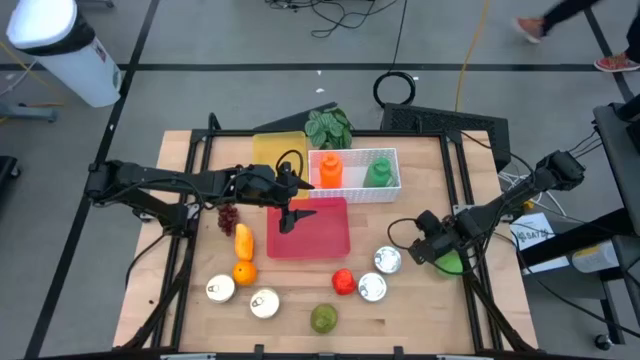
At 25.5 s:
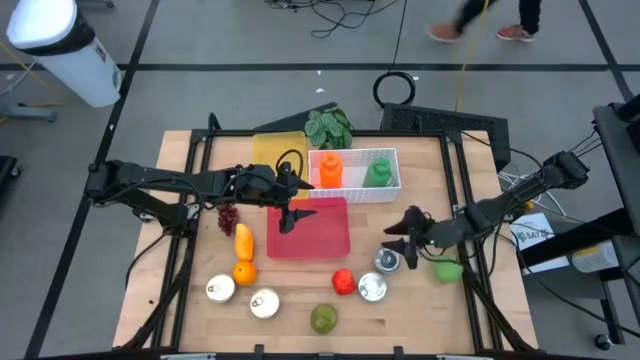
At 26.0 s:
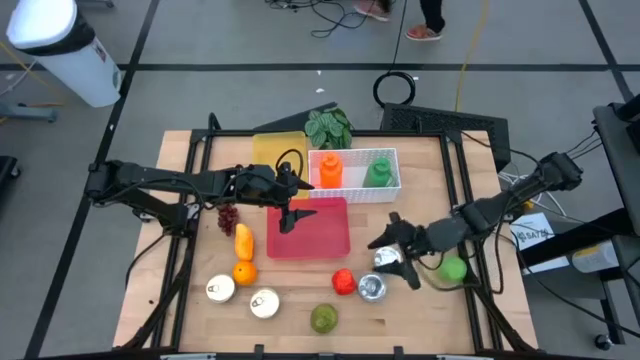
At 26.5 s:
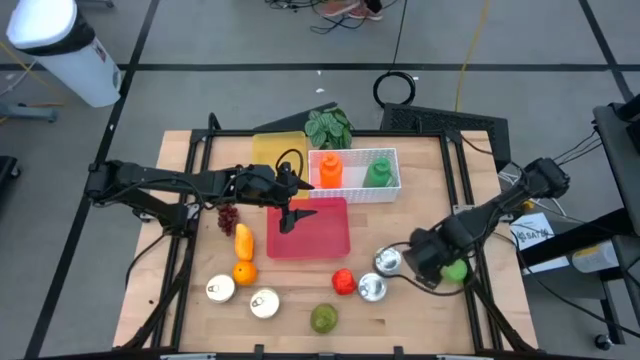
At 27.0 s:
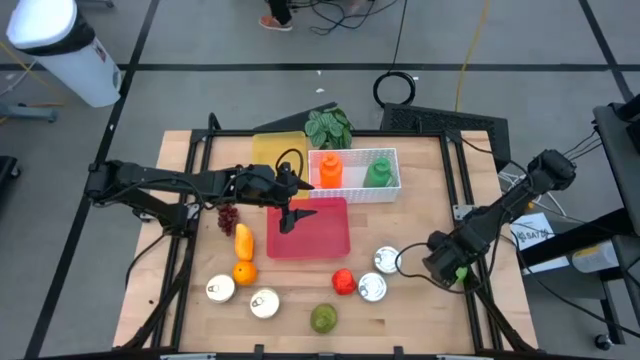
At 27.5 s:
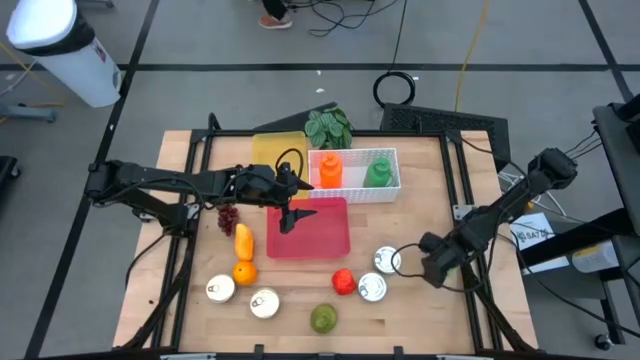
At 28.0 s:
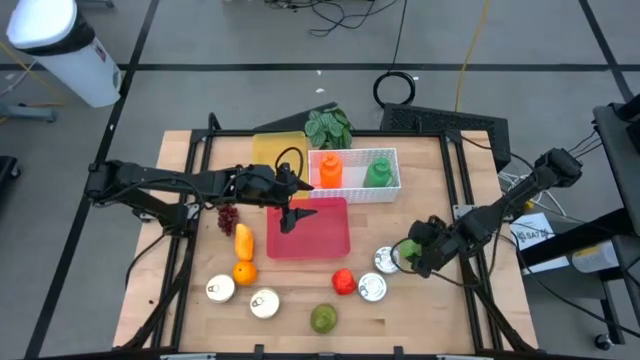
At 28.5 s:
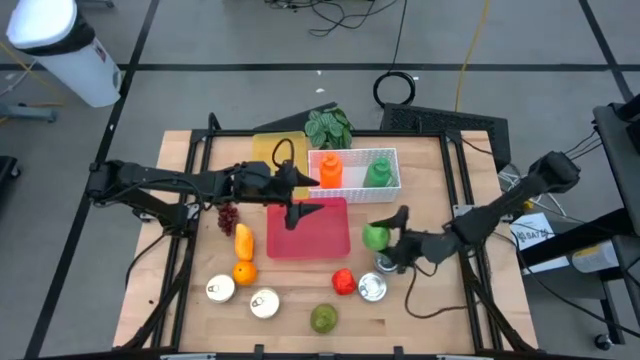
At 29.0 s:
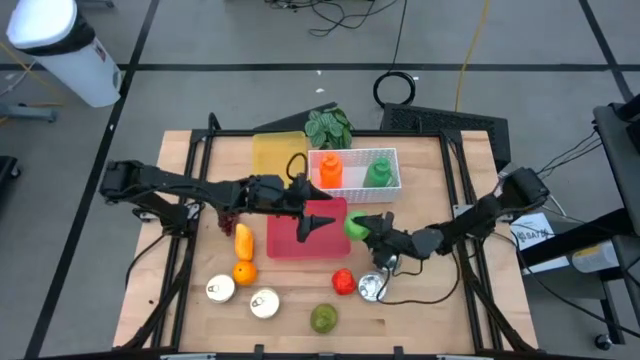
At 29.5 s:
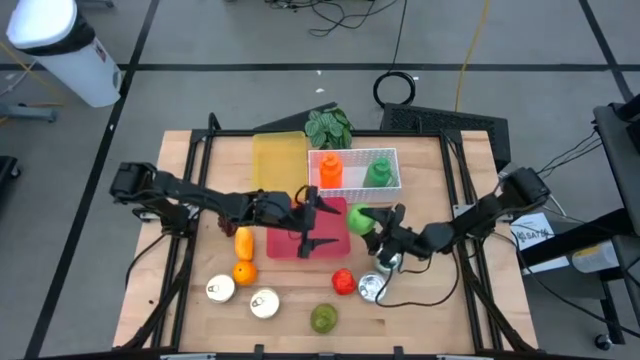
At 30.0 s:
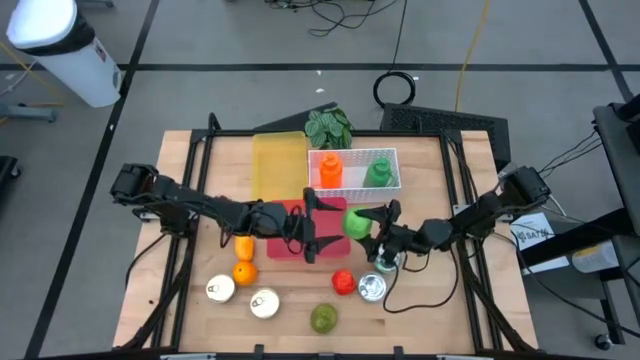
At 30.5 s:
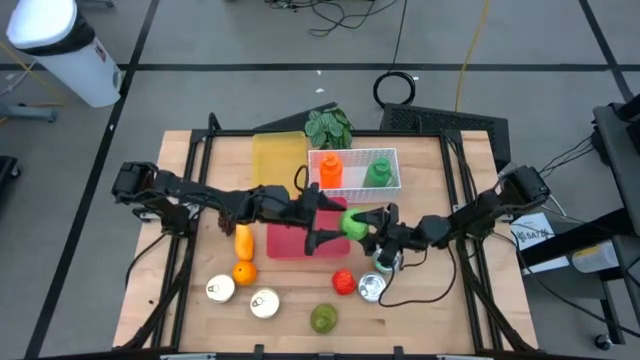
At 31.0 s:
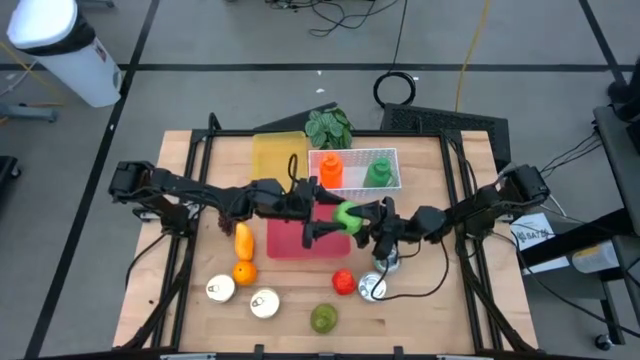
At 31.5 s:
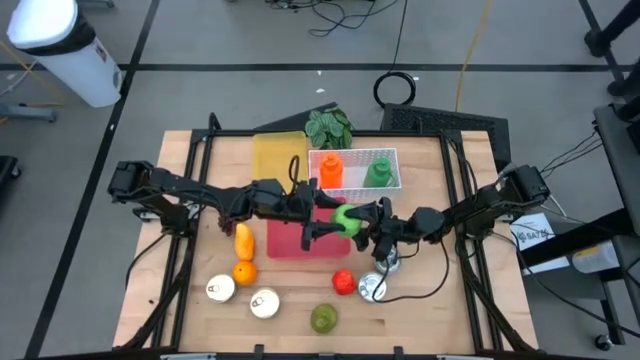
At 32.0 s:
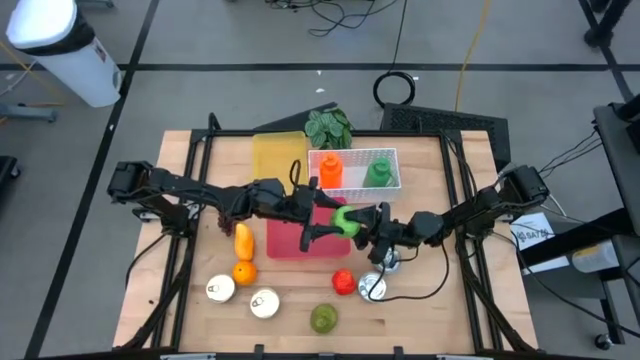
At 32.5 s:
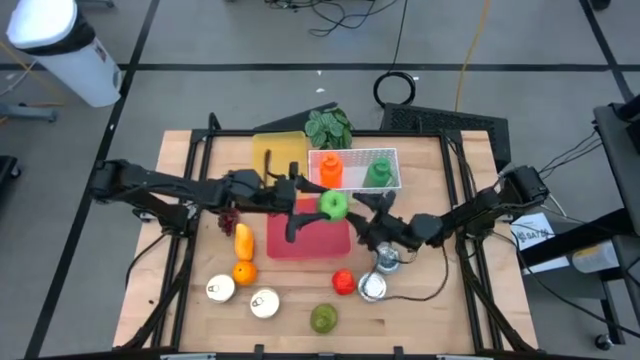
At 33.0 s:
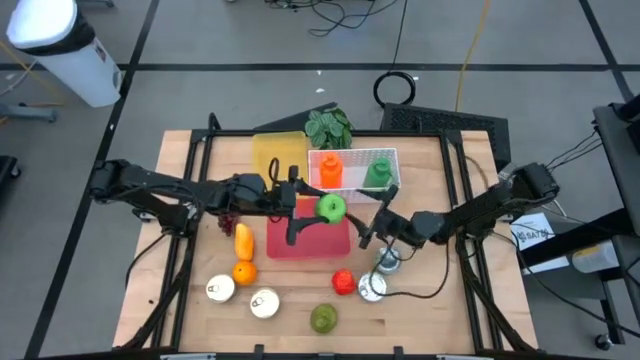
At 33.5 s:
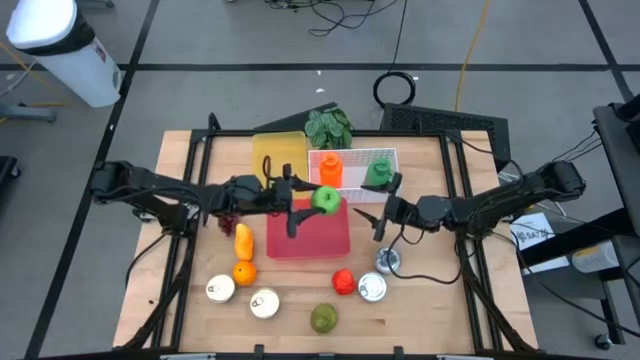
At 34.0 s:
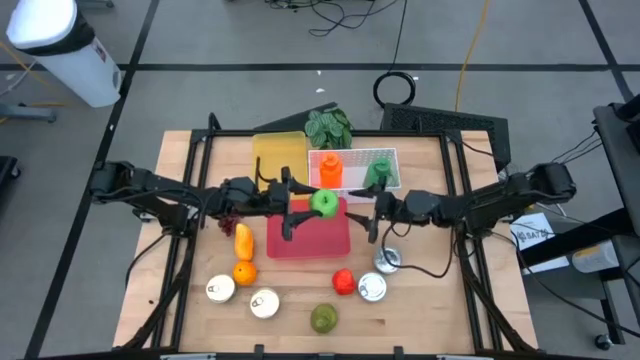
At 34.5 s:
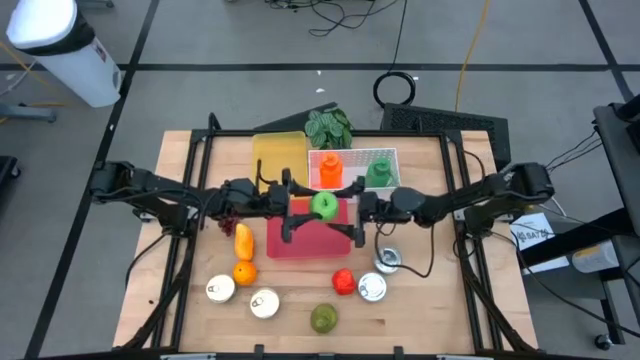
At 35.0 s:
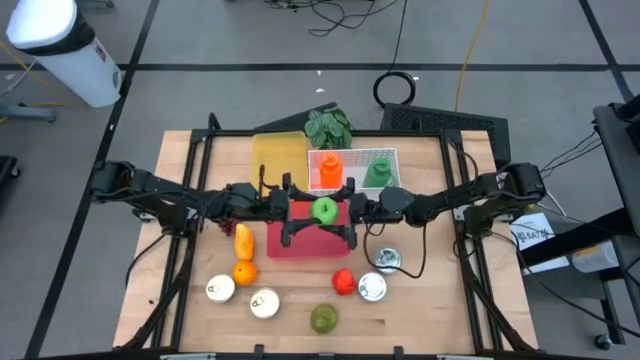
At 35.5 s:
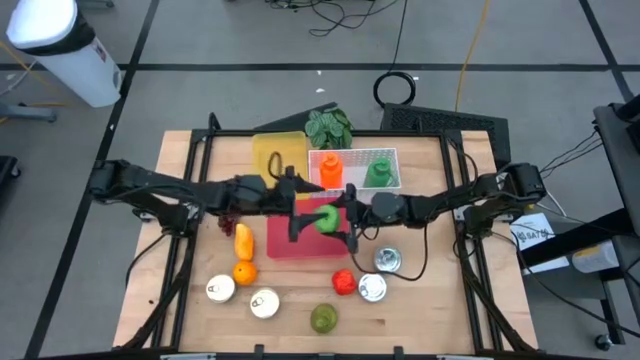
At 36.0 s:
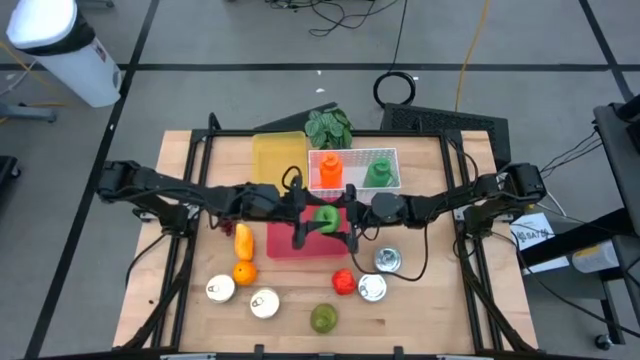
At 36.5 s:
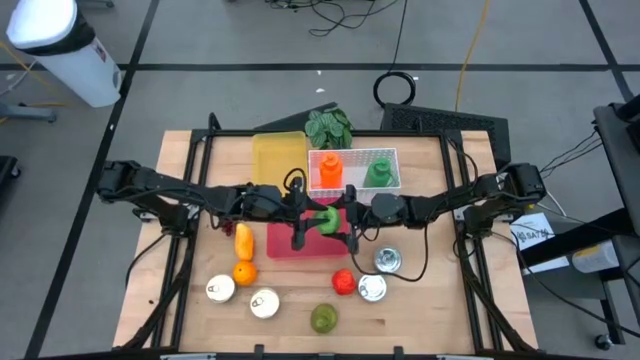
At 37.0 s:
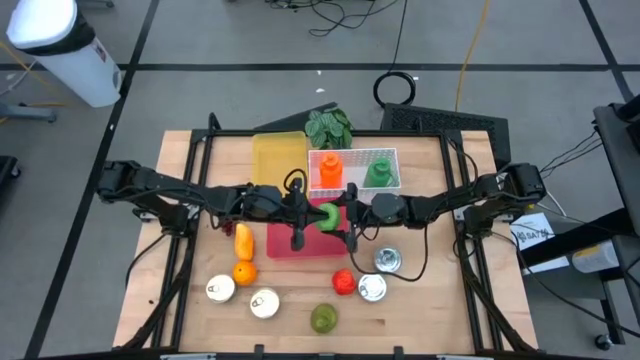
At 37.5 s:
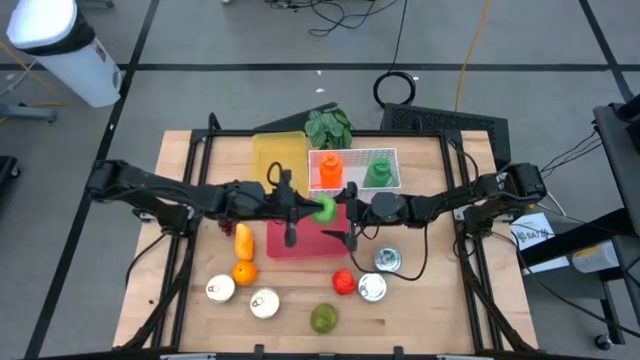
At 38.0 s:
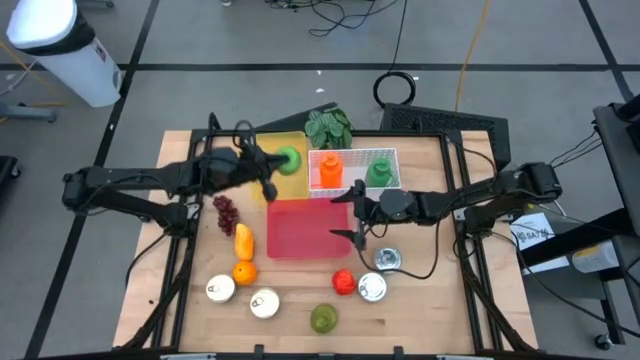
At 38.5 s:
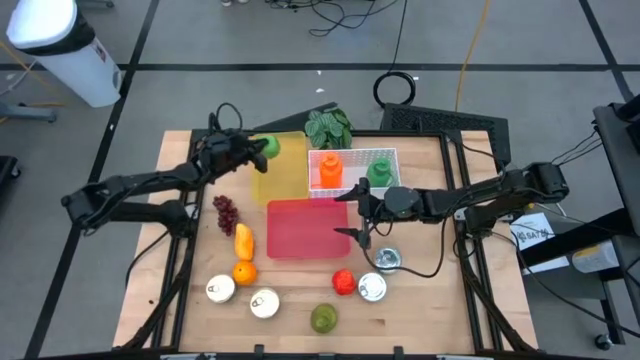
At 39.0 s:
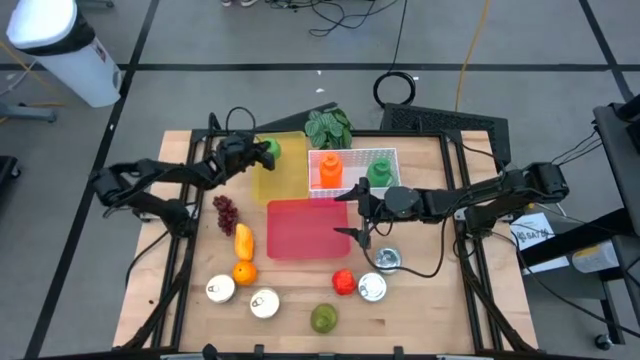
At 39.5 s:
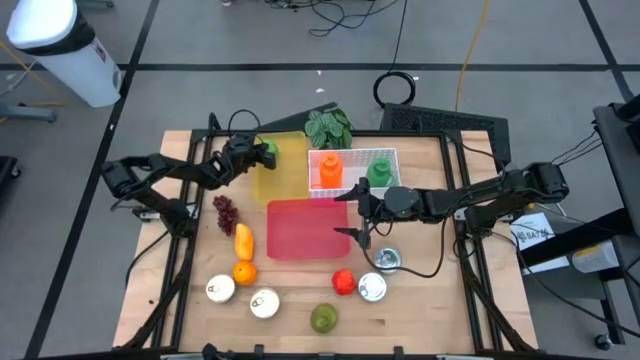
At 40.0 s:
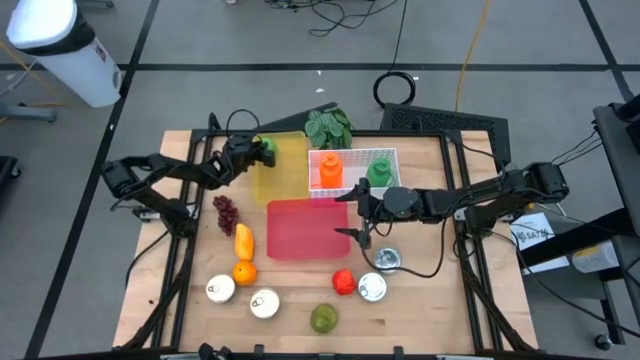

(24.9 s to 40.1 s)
Task: Pick & Place Food Item
Put the green apple in the yellow bin

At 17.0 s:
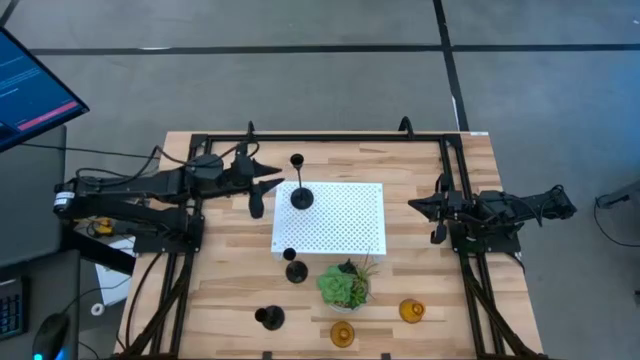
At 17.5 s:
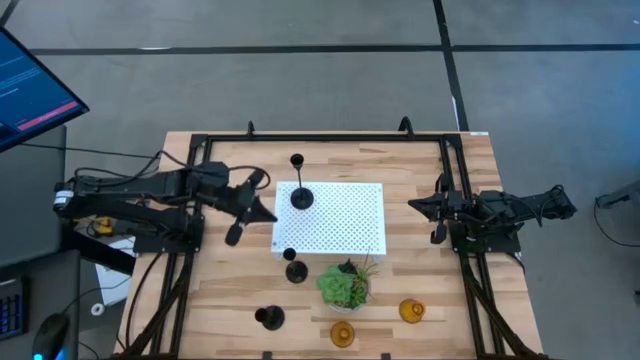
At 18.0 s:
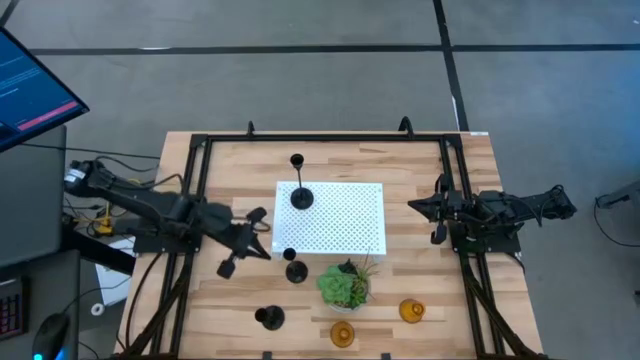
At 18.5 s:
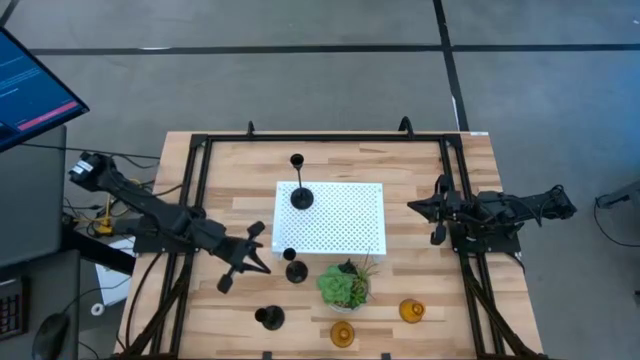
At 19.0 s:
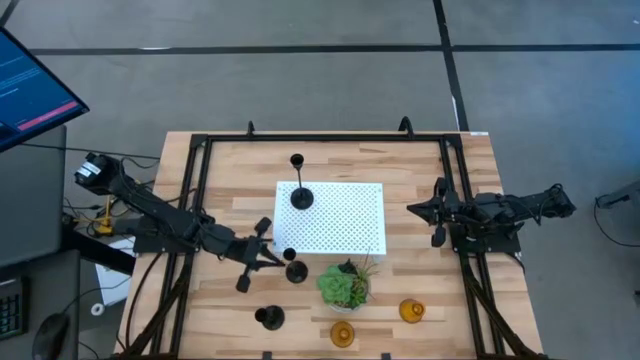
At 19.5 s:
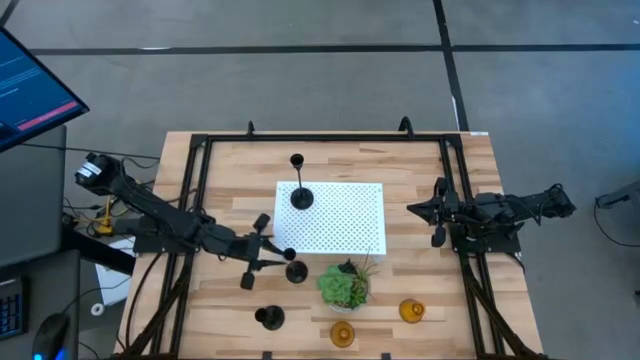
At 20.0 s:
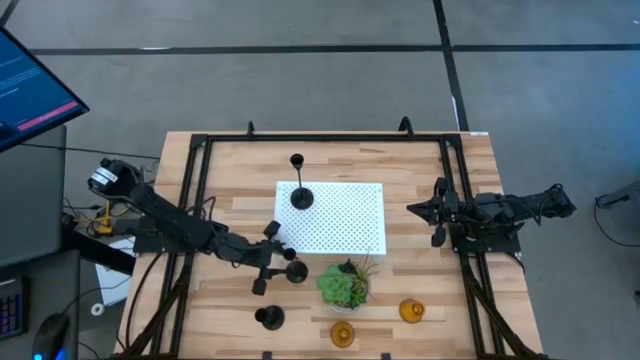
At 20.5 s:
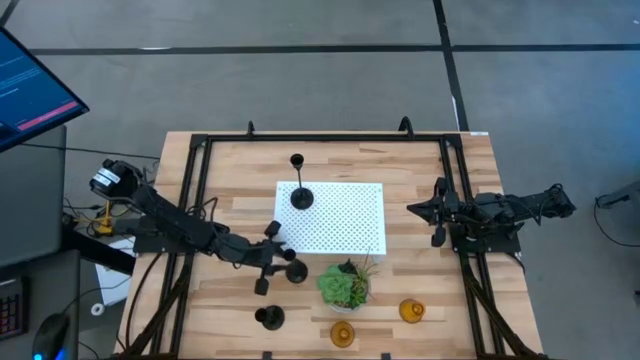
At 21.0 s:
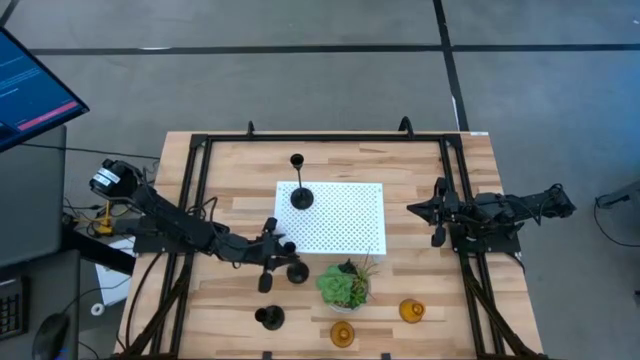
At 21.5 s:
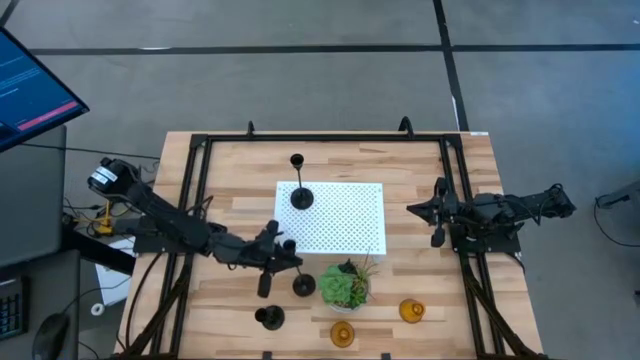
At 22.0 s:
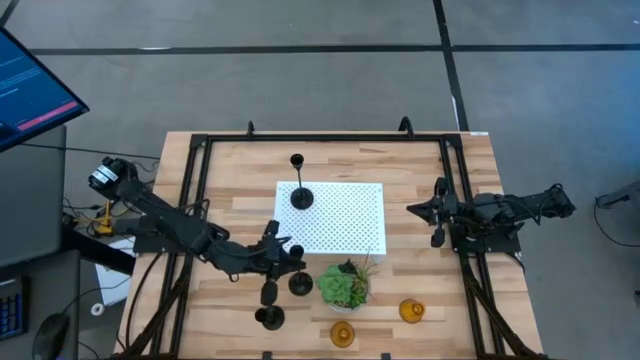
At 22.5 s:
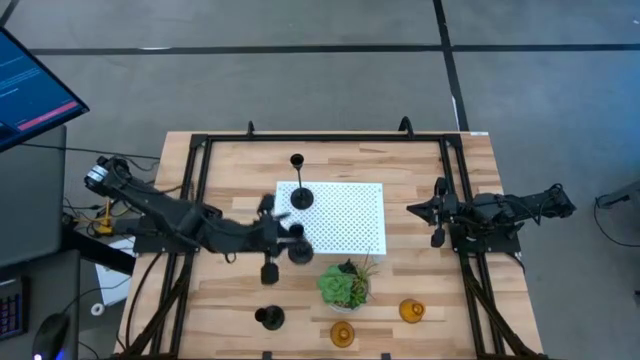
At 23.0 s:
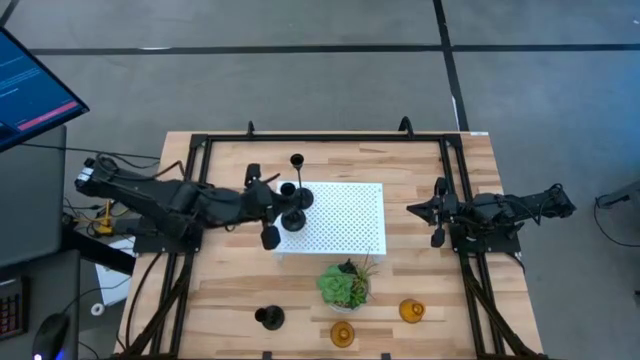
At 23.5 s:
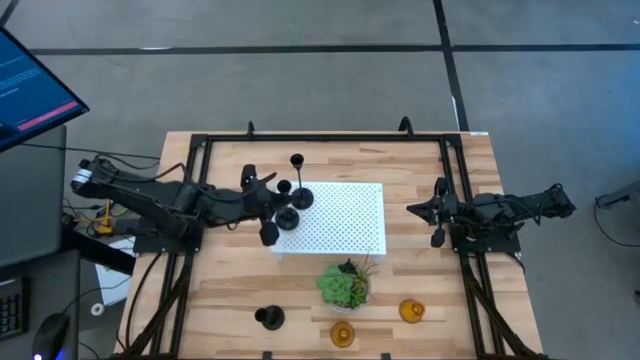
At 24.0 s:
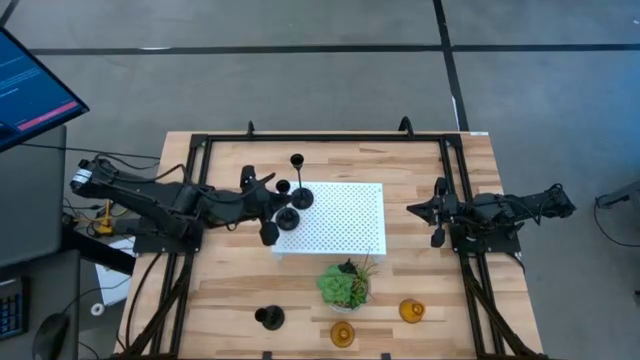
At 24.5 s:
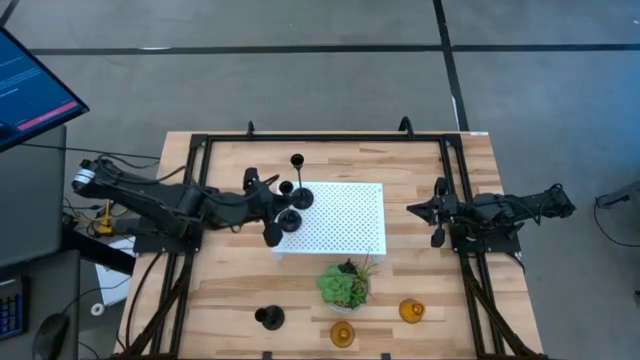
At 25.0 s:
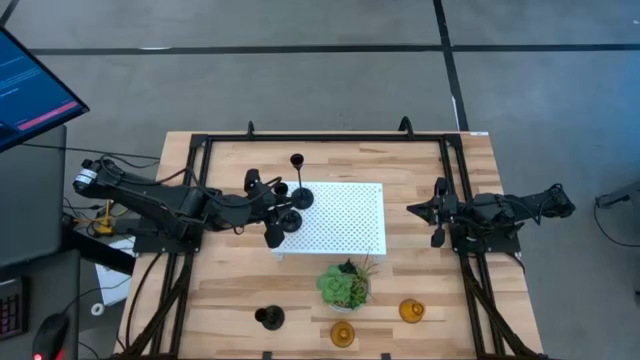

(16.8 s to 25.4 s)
Task: Pick & Place candle stick holders
Put the top black candle holder on the shelf
